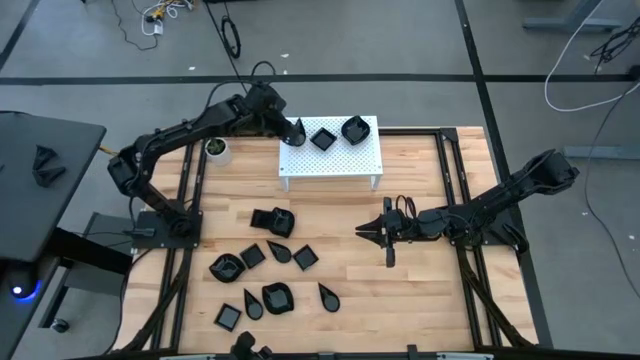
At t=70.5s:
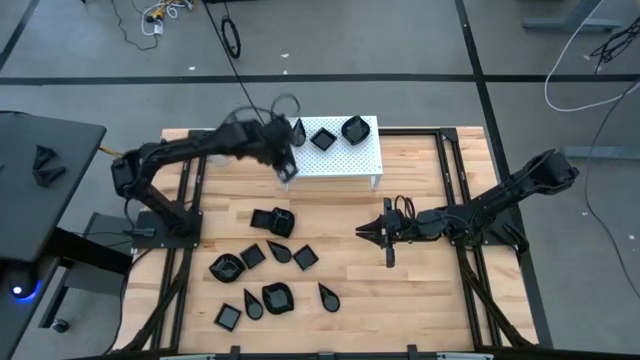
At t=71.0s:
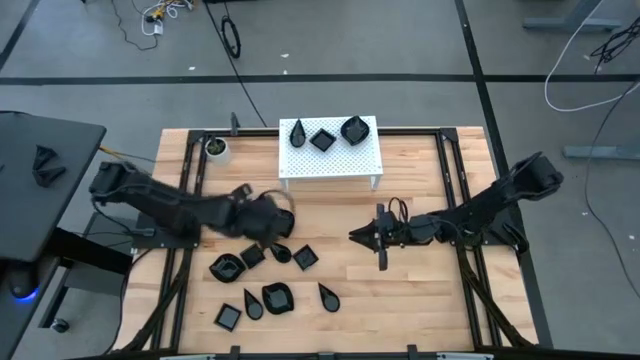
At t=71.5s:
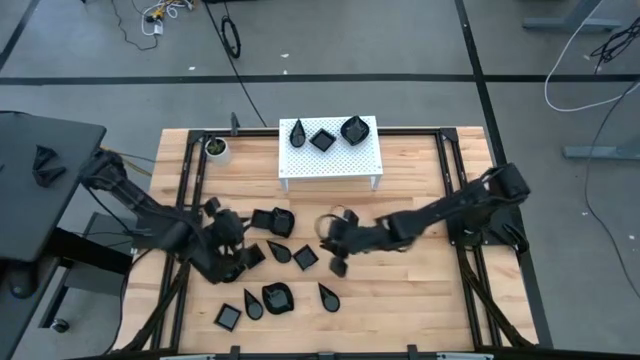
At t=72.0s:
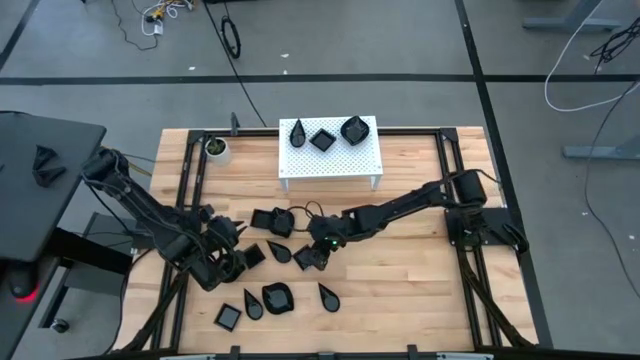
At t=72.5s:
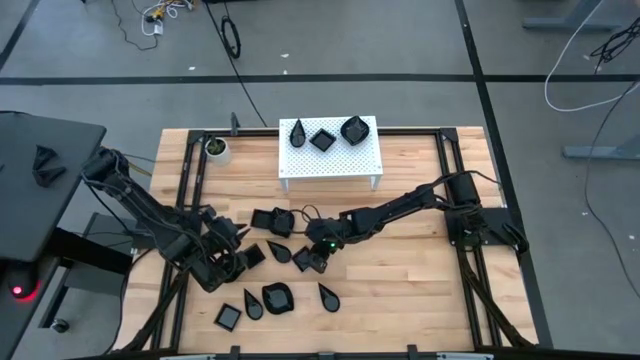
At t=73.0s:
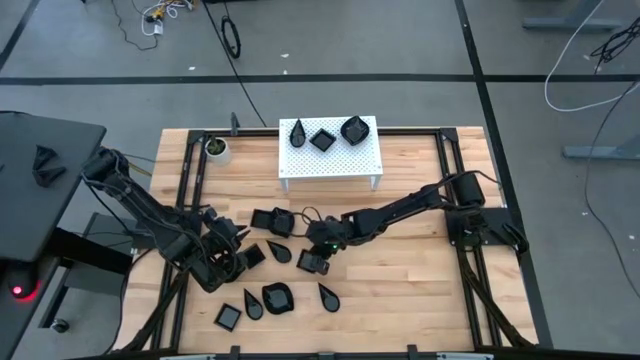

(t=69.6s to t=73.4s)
Task: Pick & Place Mini shaped plates
Stack the black square plate on top of the other black square plate on the shelf

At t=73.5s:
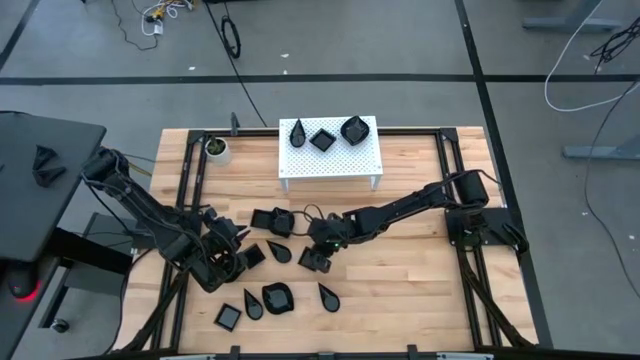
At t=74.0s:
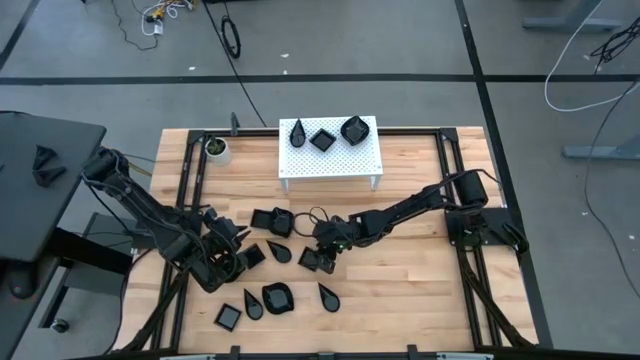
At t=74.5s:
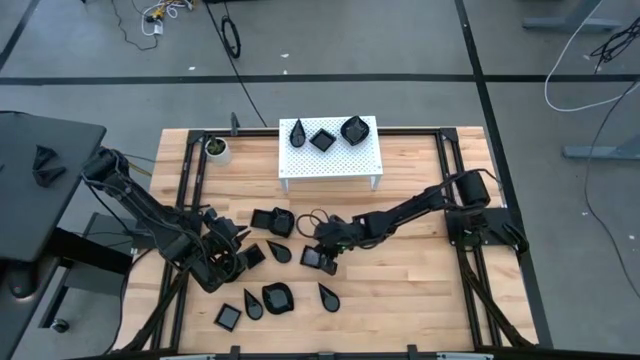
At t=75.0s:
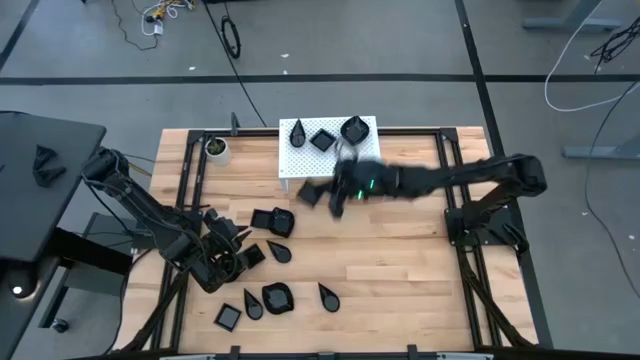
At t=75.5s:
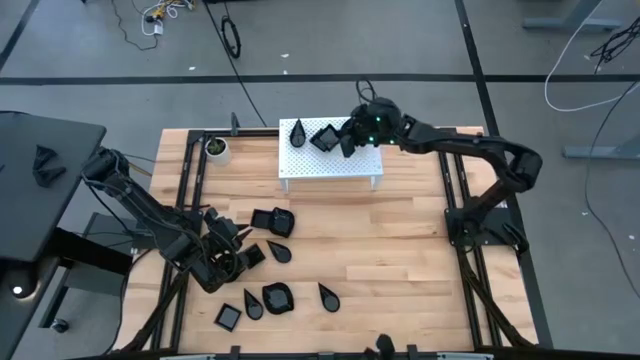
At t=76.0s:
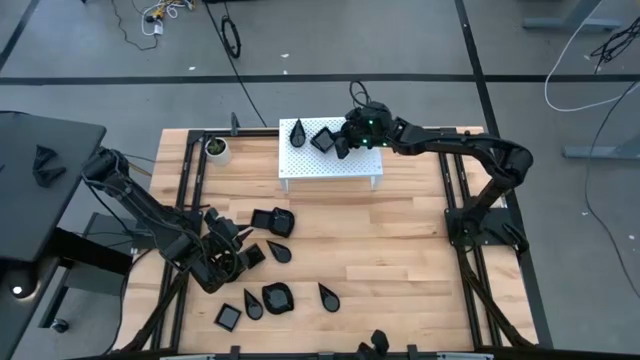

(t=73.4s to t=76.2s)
Stack the black square plate on top of the other black square plate on the shelf

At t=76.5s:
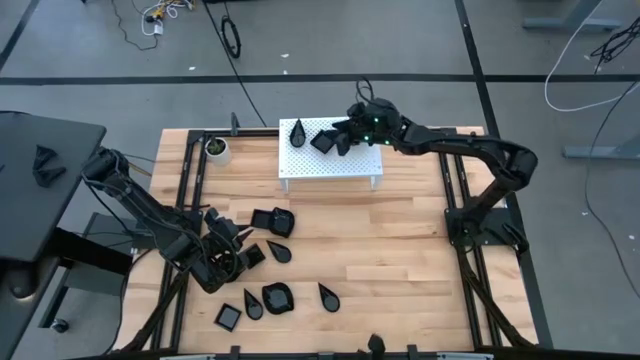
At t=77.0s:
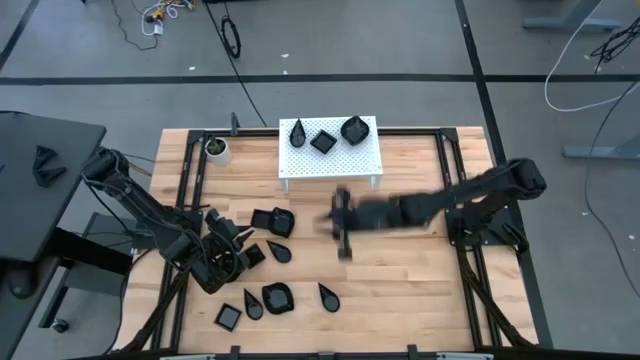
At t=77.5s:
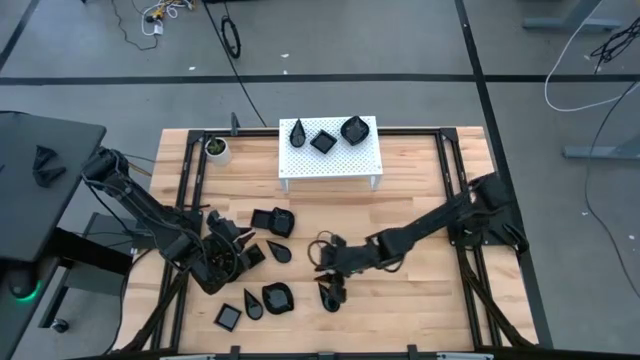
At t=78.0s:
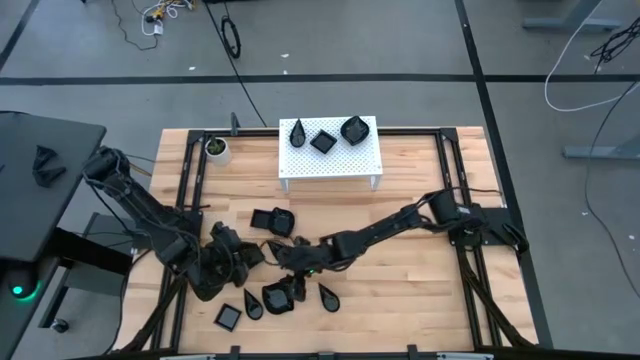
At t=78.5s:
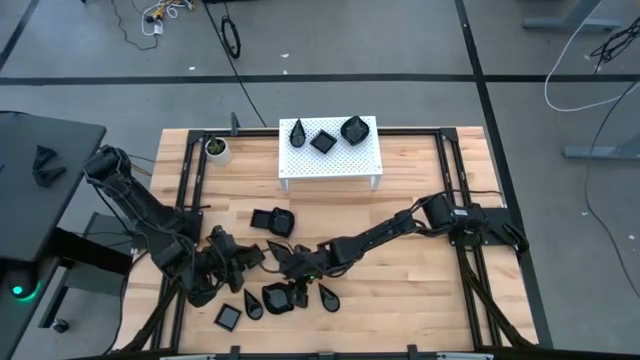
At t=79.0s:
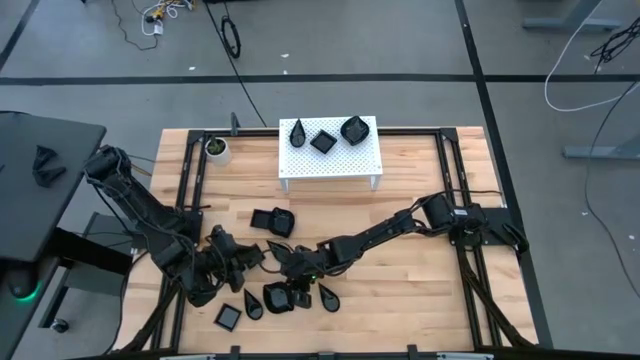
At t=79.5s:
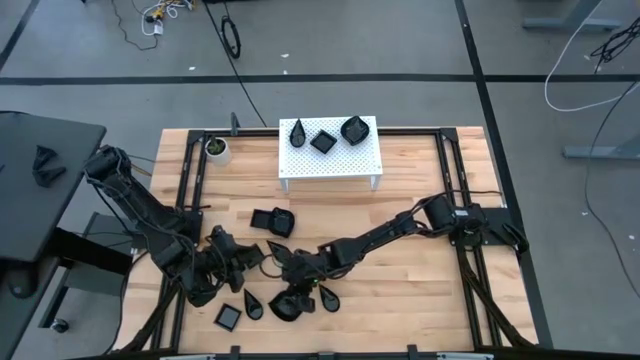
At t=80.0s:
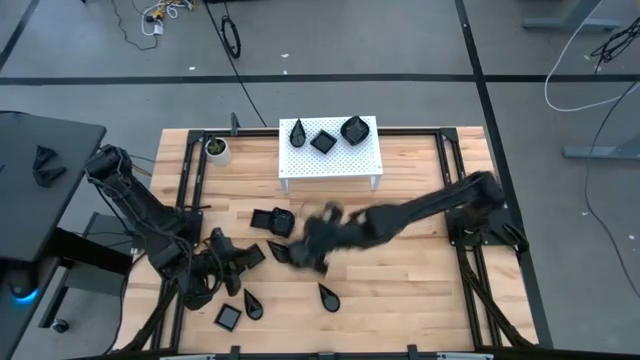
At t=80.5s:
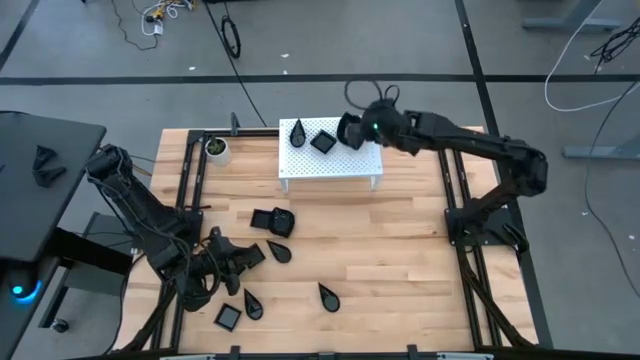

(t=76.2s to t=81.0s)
Stack the black leaf-shaped plate on top of the other black leaf-shaped plate on the shelf

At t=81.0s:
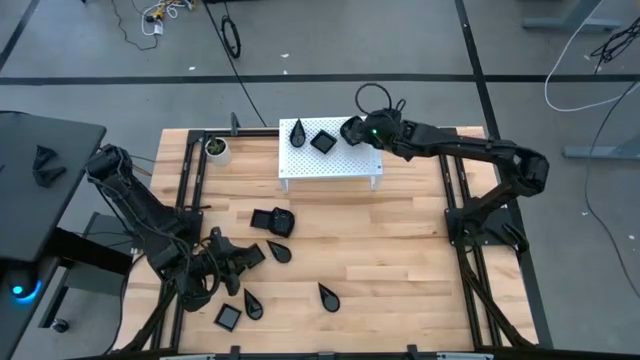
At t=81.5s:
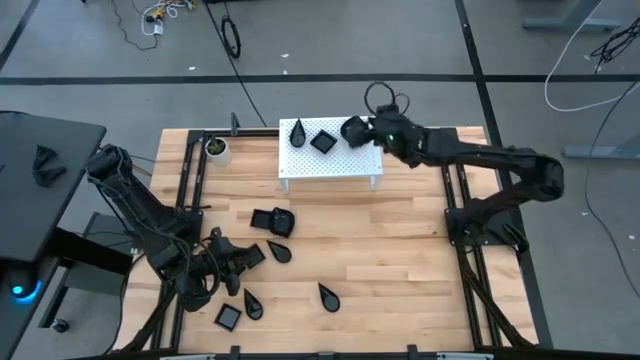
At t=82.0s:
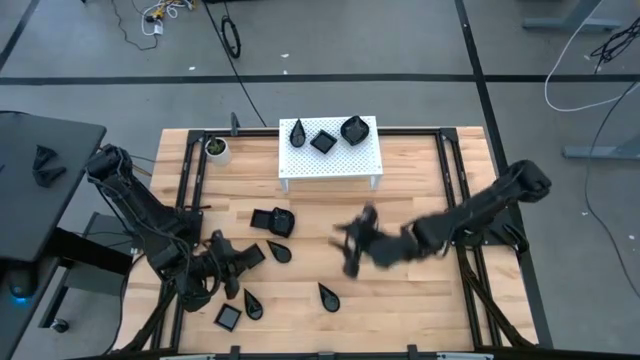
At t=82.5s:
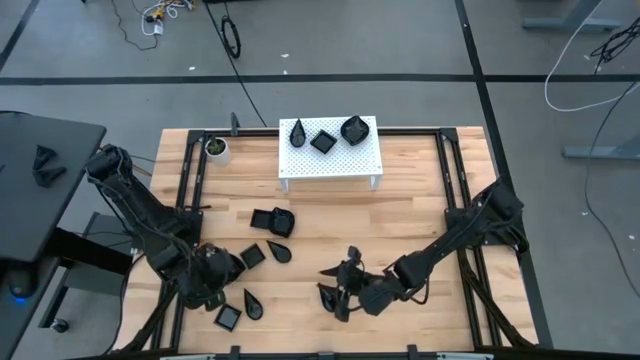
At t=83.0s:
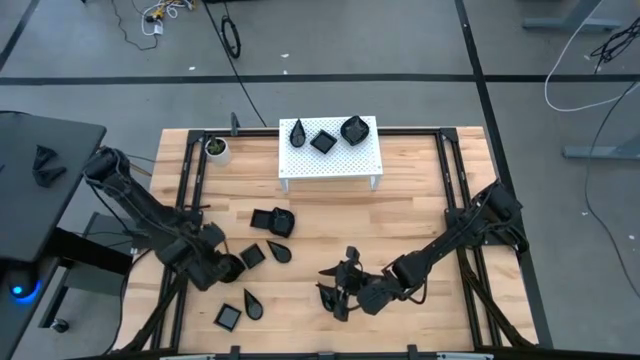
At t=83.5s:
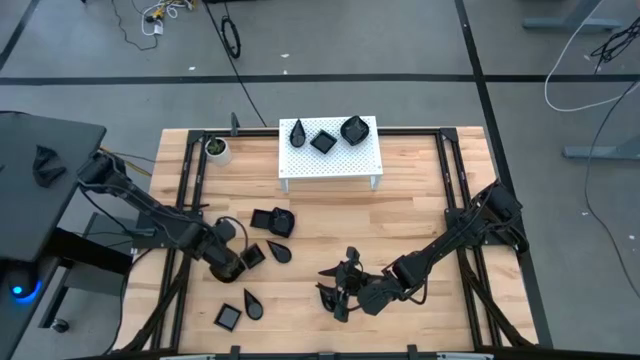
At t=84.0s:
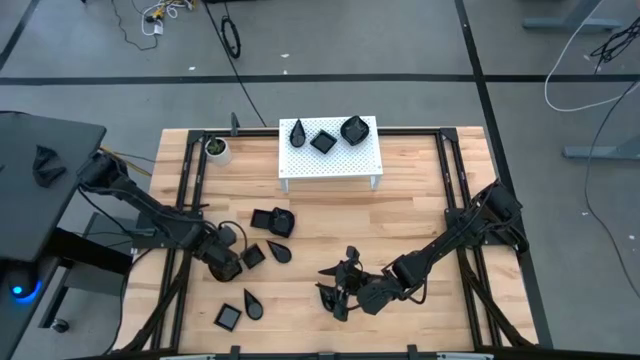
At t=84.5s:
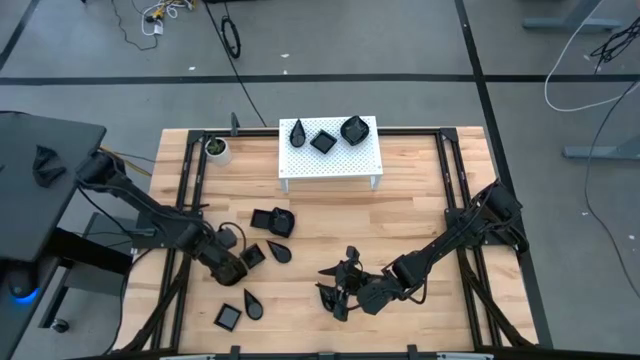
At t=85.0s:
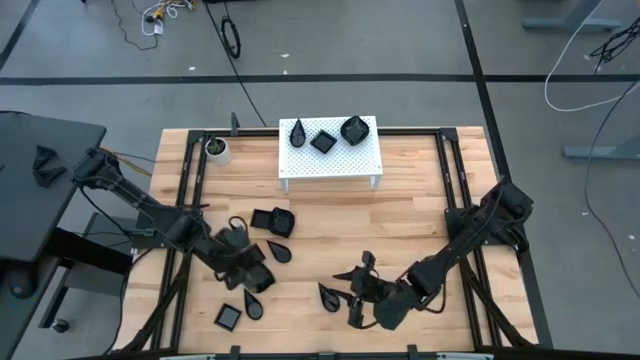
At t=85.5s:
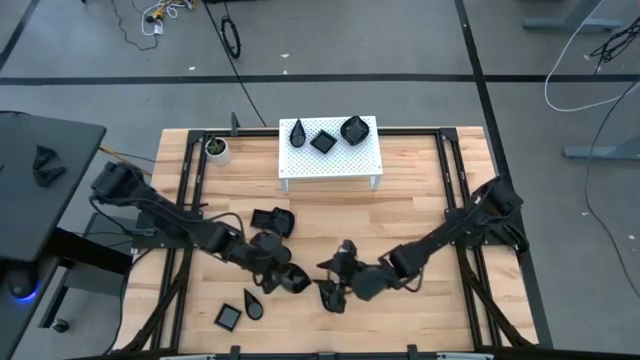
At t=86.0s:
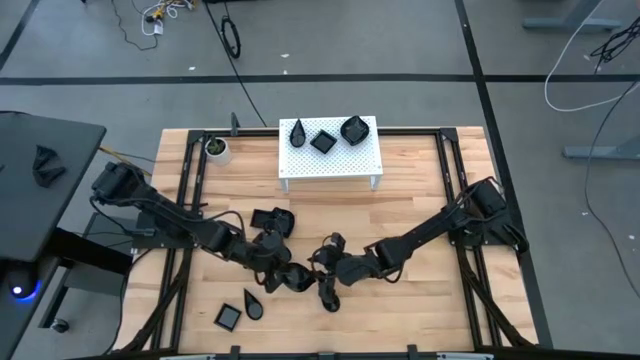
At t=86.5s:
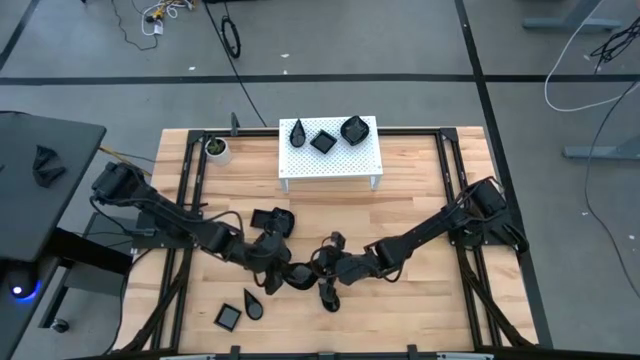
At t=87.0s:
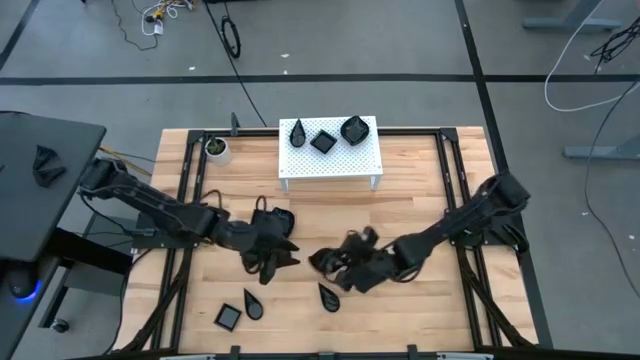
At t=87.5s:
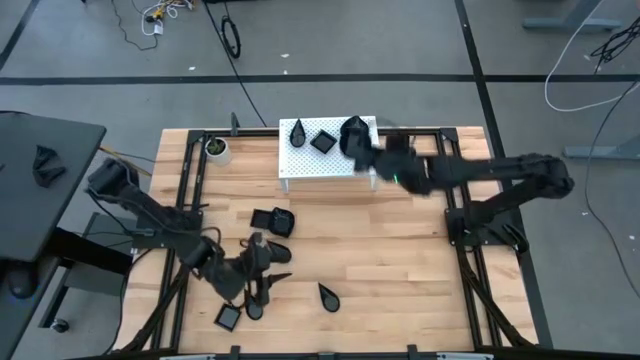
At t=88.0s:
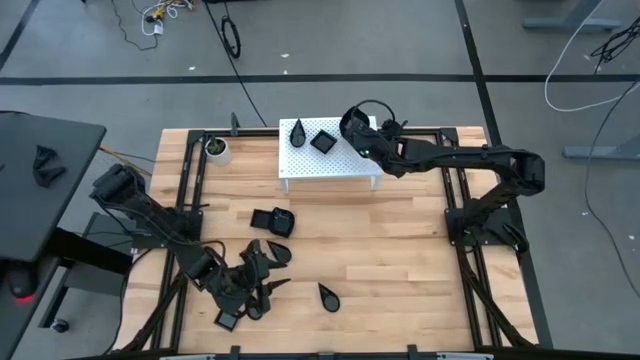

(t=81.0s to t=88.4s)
Stack the black leaf-shaped plate on top of the other black leaf-shaped plate on the shelf

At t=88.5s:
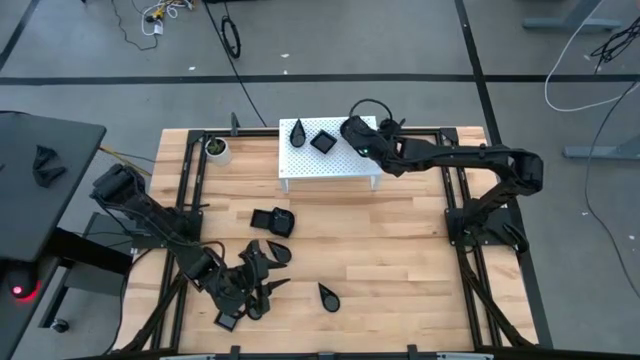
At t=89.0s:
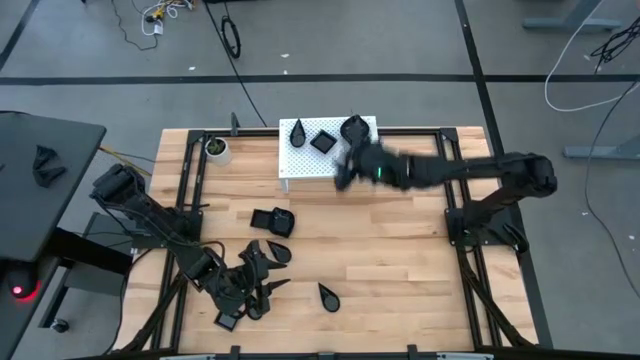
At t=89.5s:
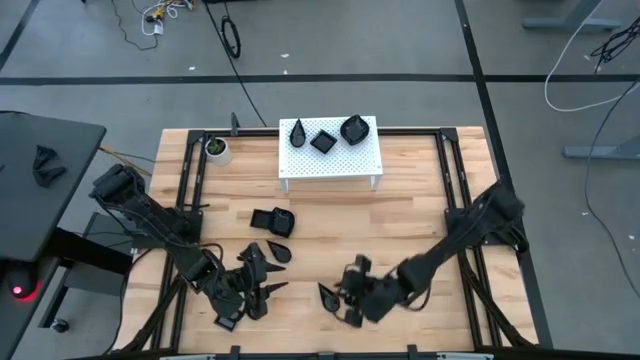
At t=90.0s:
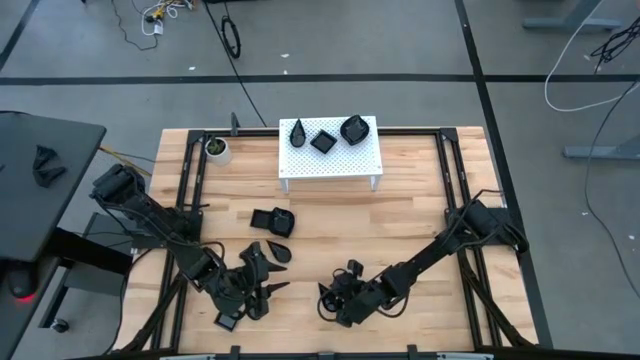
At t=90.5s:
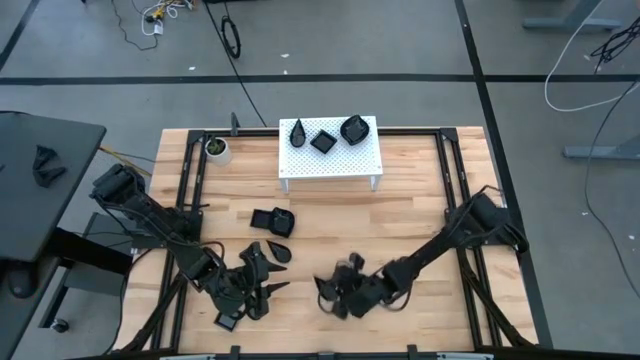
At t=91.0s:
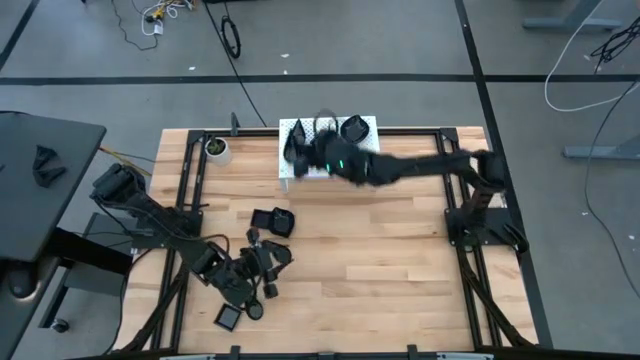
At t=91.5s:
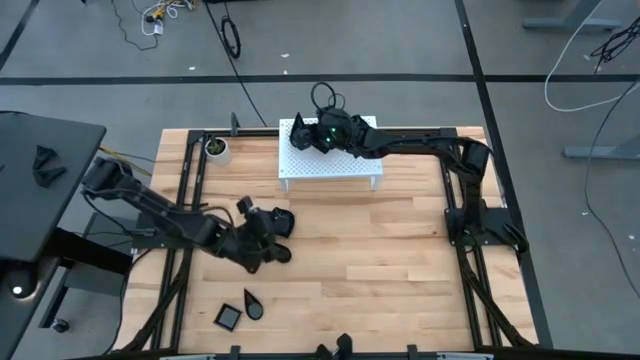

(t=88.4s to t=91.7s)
Stack the black drop-shaped plate on top of the other black drop-shaped plate on the shelf
